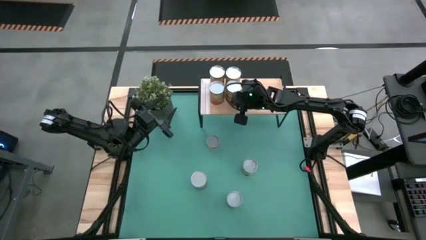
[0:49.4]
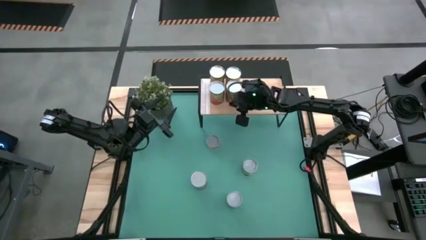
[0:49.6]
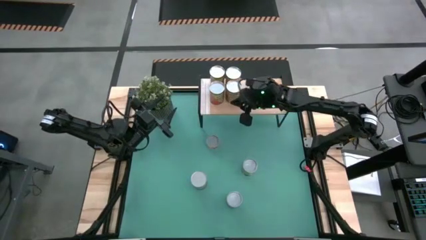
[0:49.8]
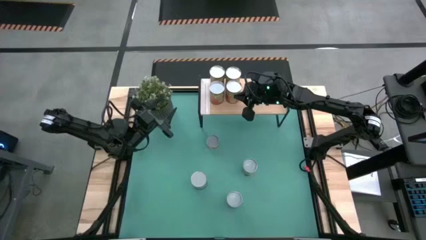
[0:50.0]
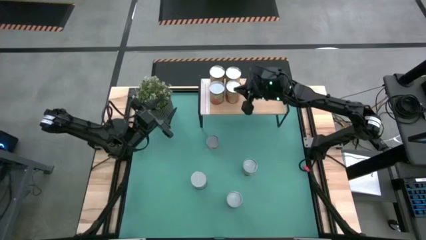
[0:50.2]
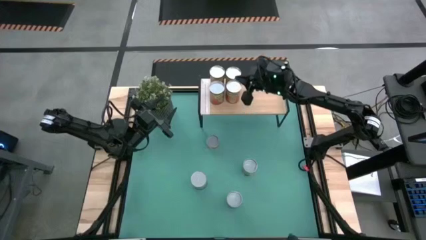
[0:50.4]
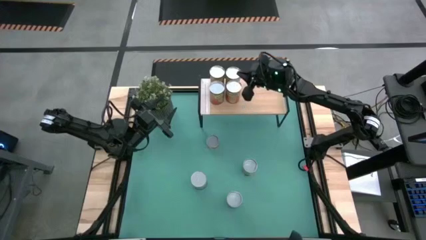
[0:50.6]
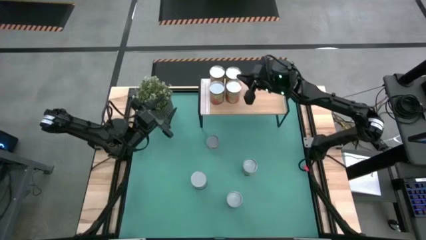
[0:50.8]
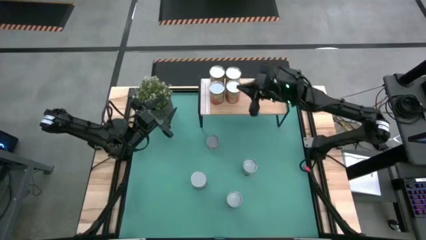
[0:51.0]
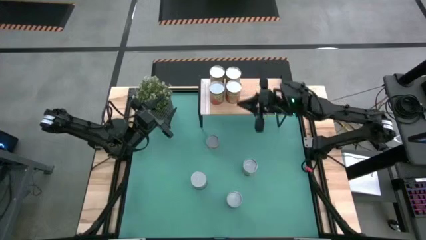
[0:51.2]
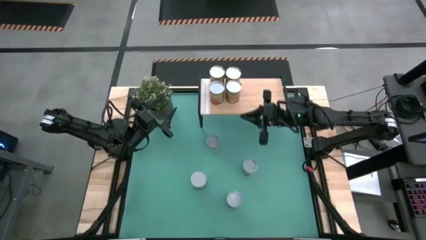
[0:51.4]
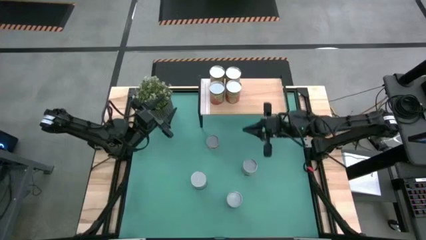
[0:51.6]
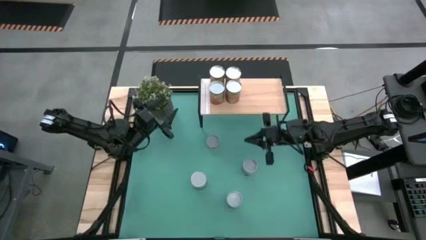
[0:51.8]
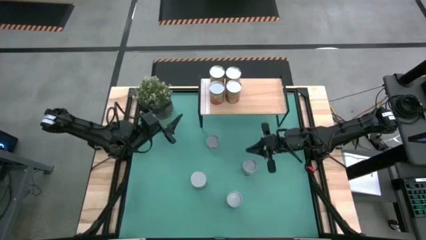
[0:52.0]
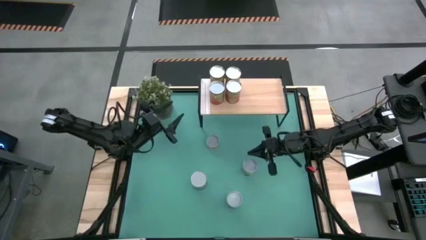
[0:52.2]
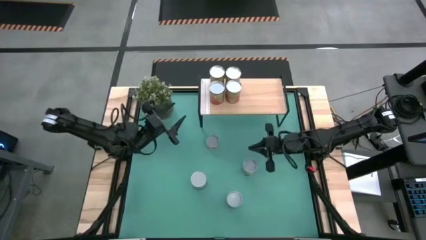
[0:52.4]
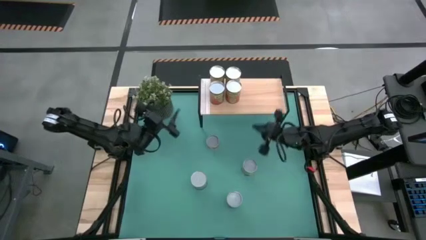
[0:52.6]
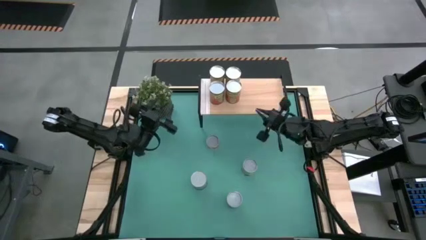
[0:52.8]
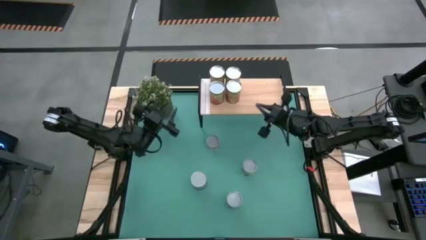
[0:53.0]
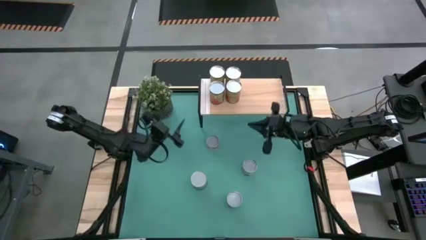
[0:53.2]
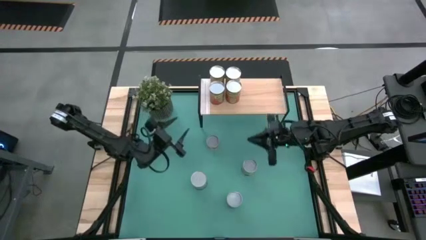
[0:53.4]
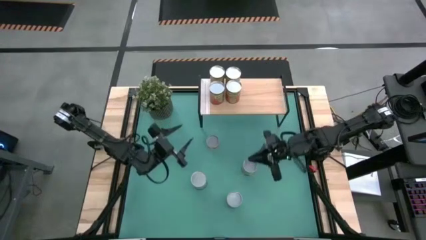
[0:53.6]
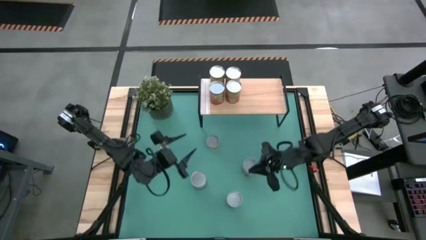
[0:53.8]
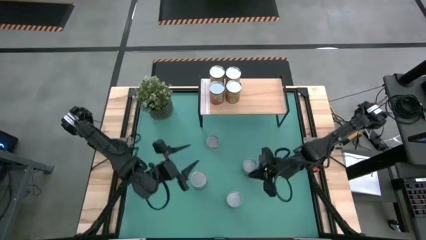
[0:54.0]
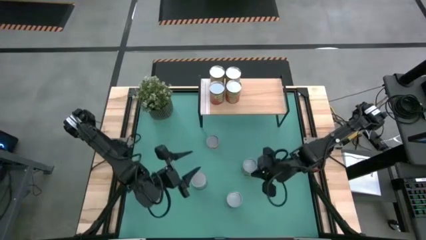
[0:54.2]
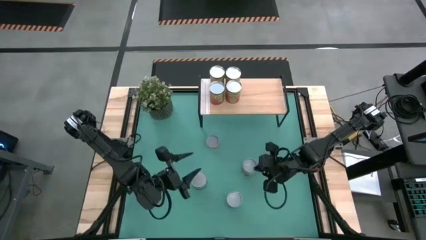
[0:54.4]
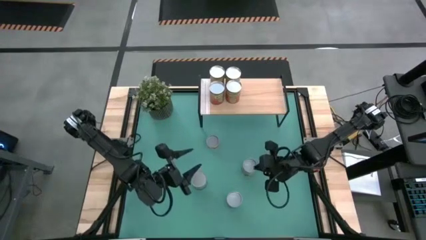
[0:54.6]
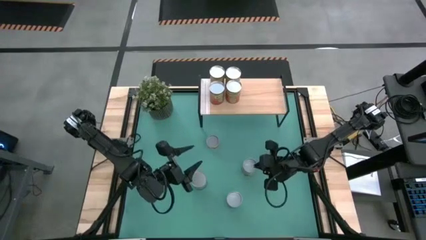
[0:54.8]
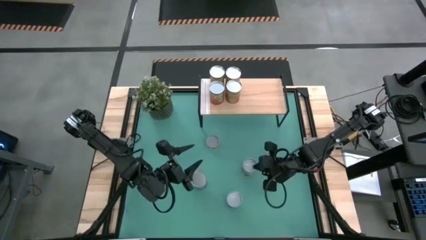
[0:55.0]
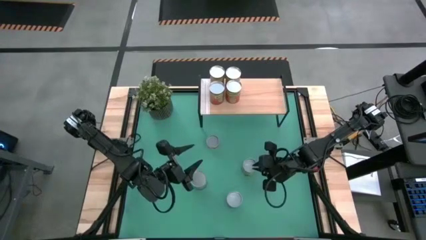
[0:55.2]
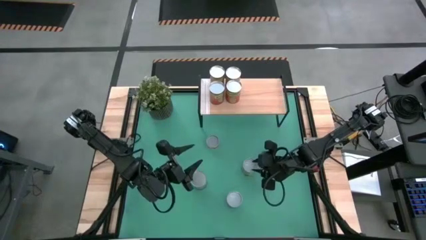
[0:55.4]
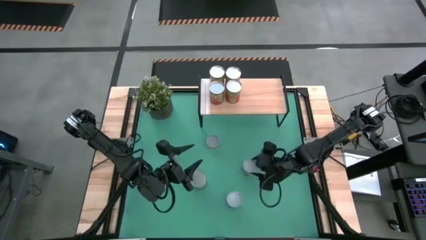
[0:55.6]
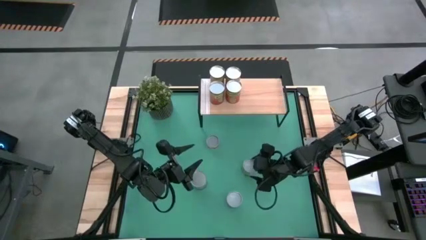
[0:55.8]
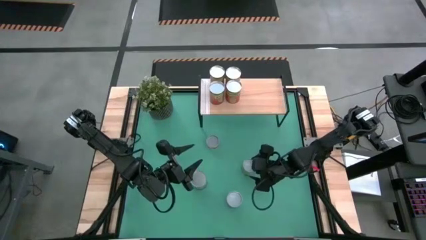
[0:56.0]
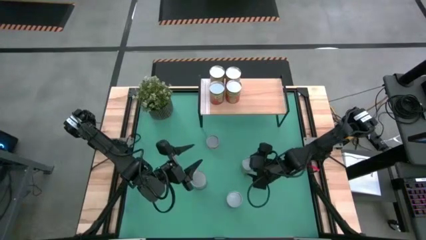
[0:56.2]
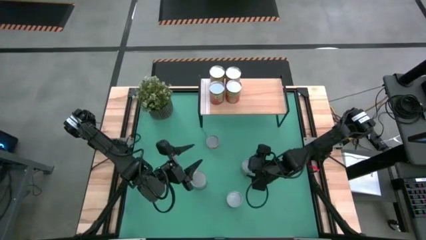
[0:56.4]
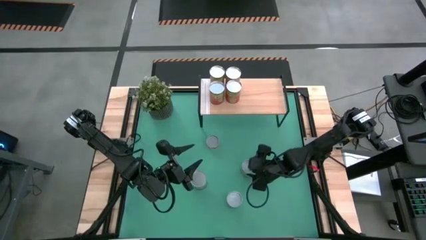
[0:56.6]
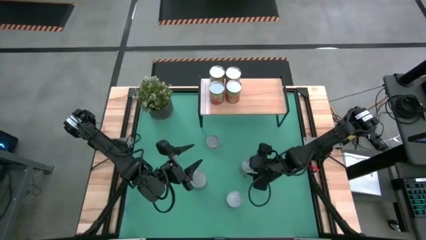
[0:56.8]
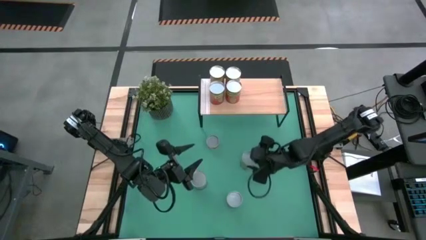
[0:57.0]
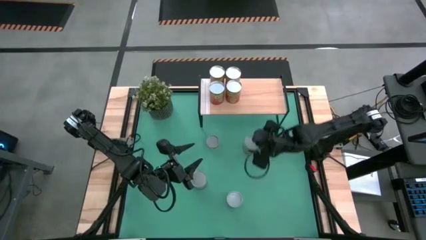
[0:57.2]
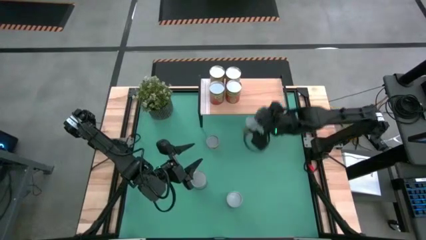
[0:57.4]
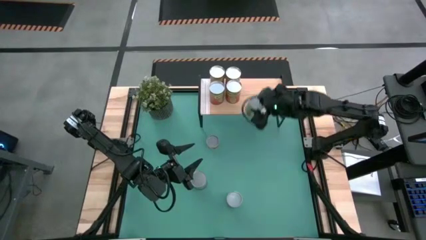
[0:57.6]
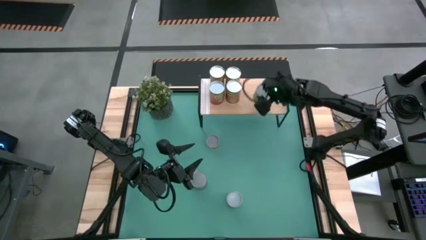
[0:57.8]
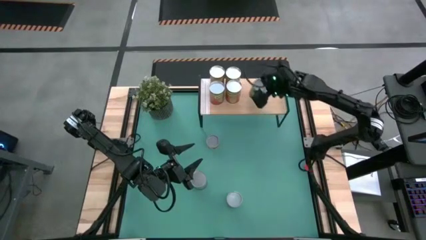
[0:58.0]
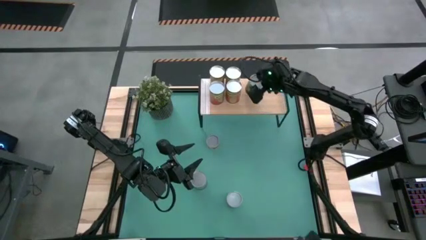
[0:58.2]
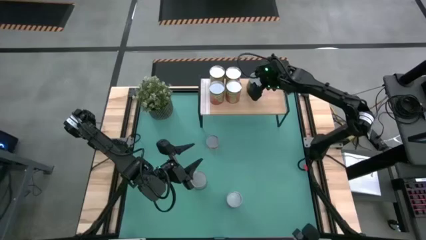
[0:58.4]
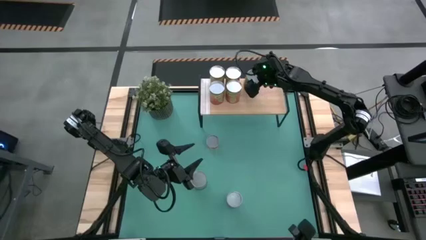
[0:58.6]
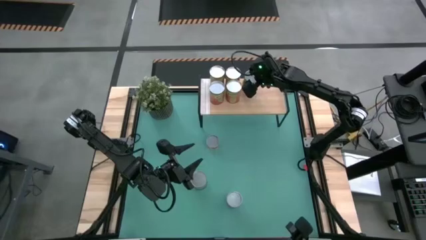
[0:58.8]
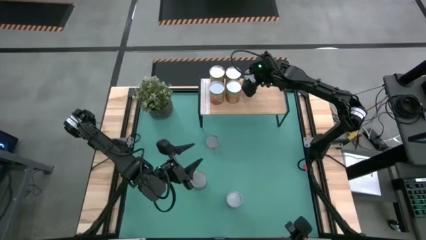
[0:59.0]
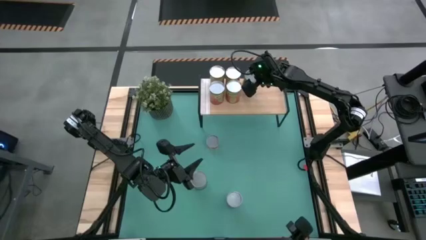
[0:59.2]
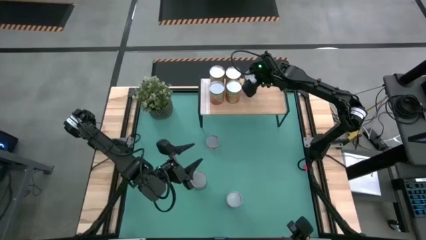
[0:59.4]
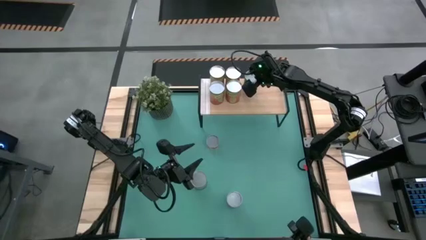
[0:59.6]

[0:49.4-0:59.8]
Task: Pick and place cans onto a shelf
Put the canned spaghetti sauce on the shelf
